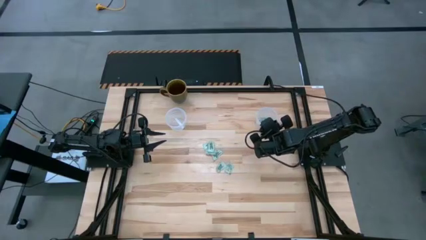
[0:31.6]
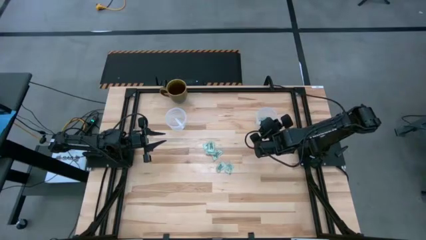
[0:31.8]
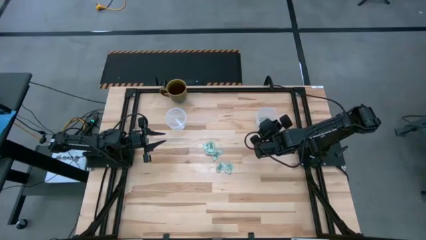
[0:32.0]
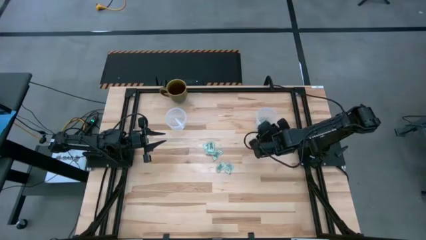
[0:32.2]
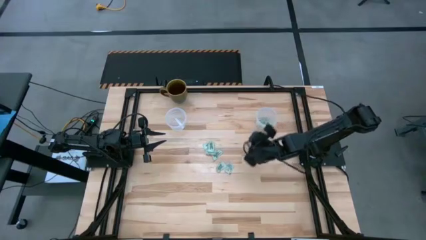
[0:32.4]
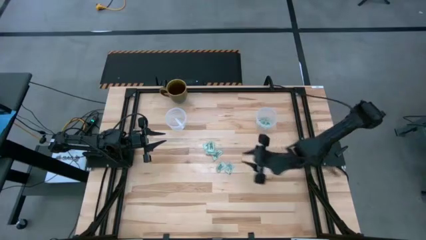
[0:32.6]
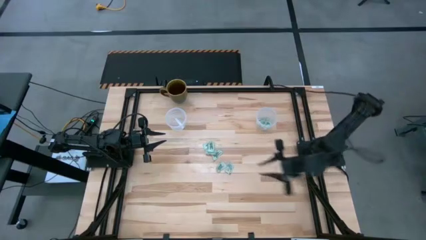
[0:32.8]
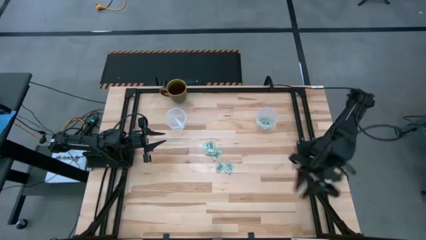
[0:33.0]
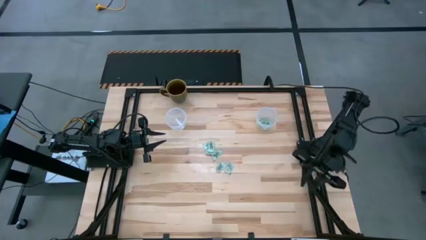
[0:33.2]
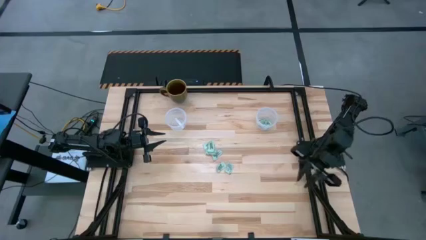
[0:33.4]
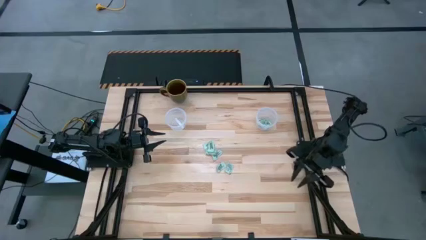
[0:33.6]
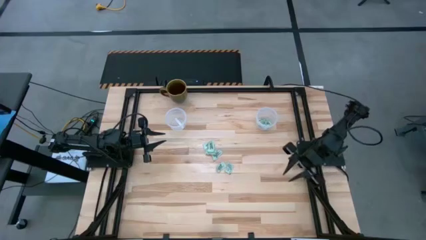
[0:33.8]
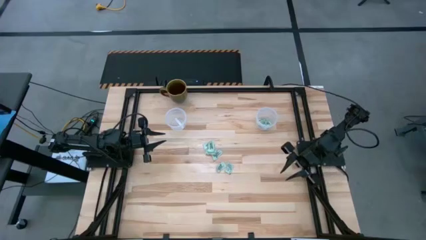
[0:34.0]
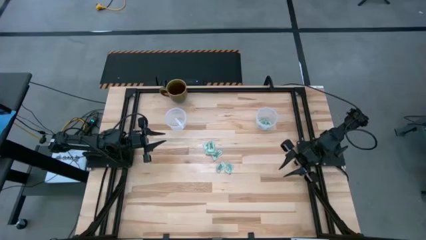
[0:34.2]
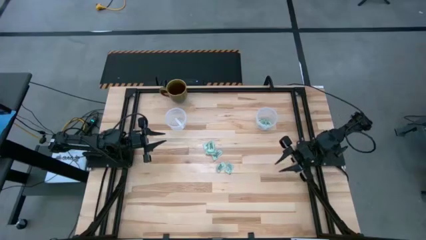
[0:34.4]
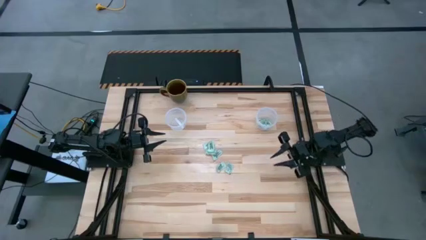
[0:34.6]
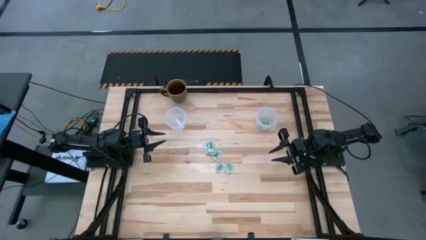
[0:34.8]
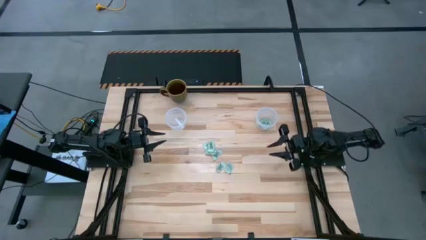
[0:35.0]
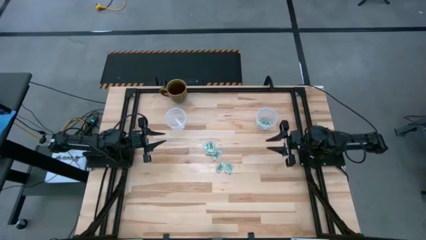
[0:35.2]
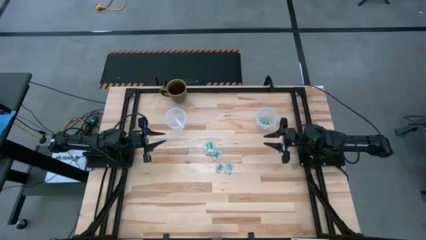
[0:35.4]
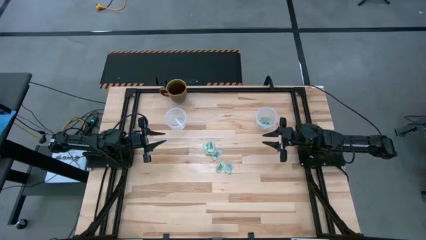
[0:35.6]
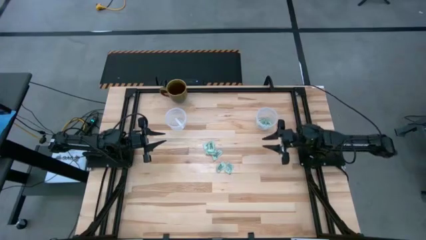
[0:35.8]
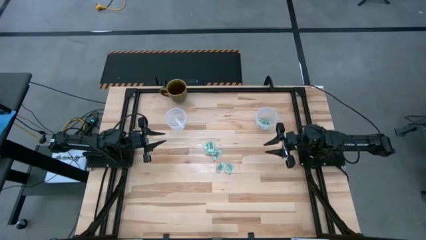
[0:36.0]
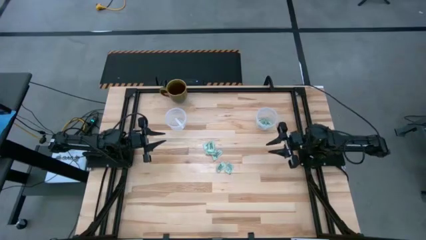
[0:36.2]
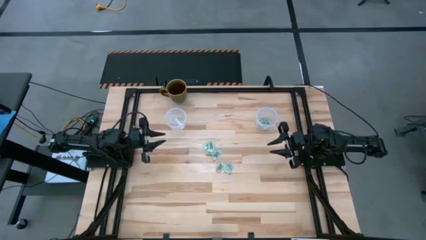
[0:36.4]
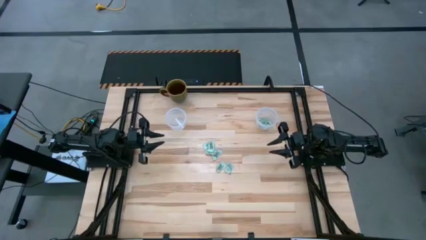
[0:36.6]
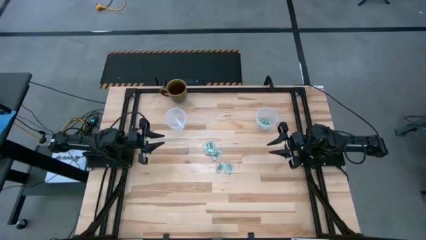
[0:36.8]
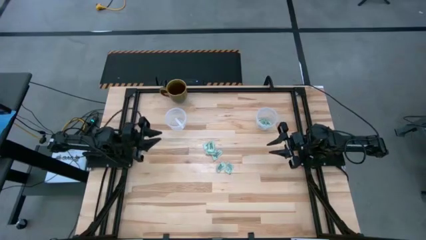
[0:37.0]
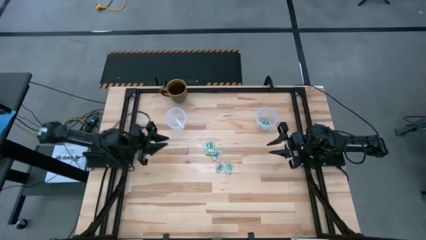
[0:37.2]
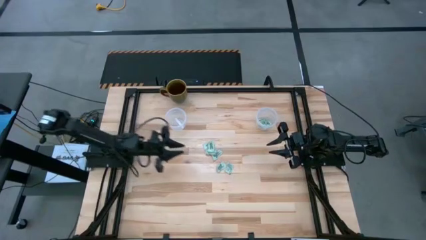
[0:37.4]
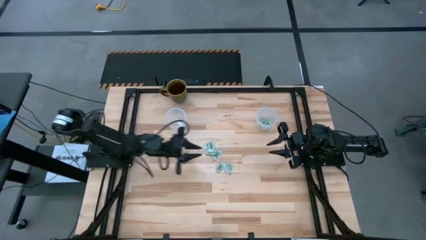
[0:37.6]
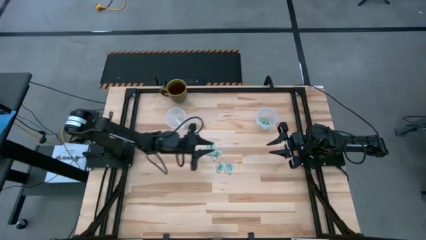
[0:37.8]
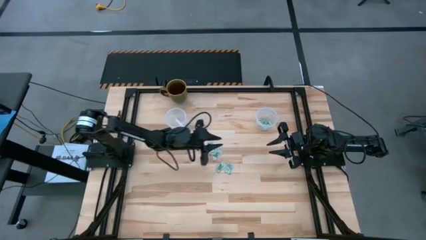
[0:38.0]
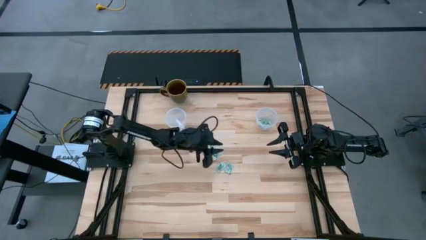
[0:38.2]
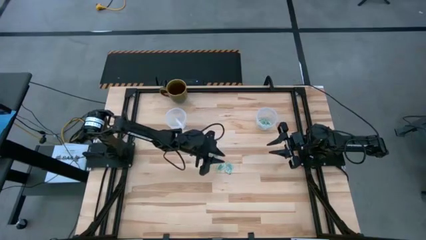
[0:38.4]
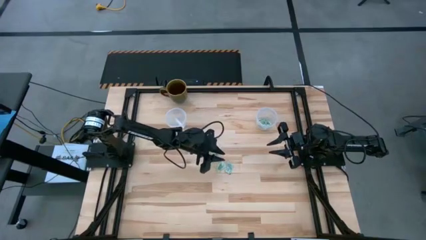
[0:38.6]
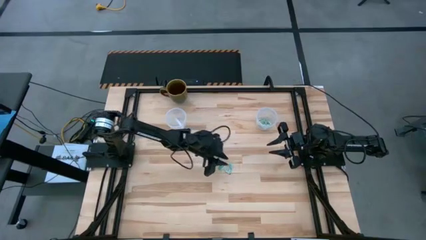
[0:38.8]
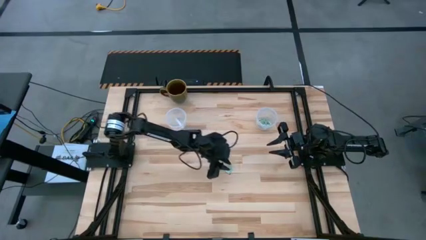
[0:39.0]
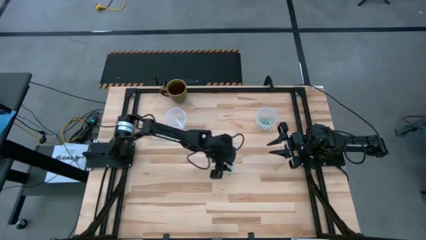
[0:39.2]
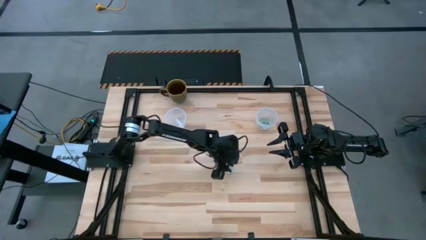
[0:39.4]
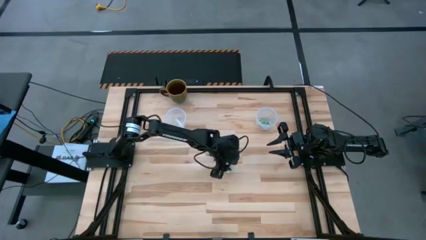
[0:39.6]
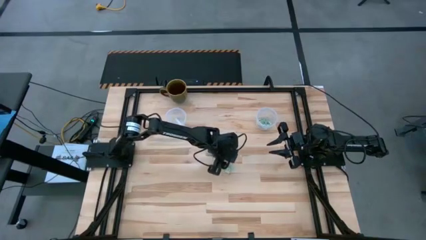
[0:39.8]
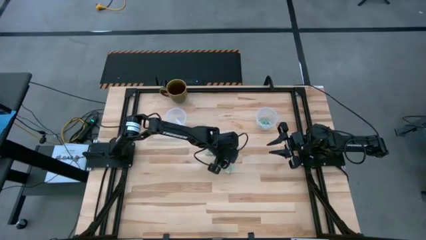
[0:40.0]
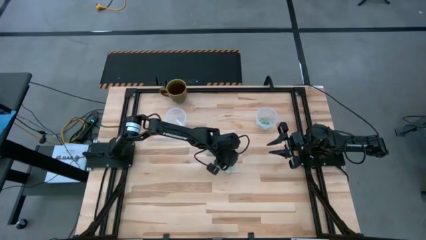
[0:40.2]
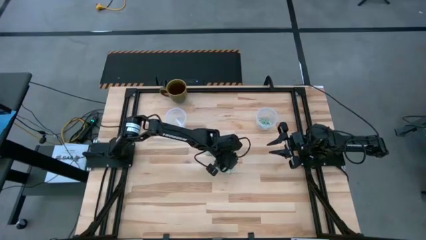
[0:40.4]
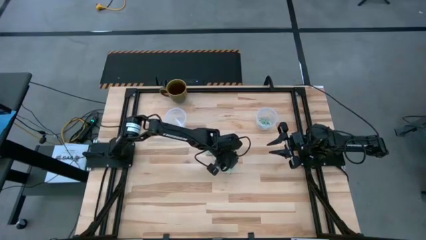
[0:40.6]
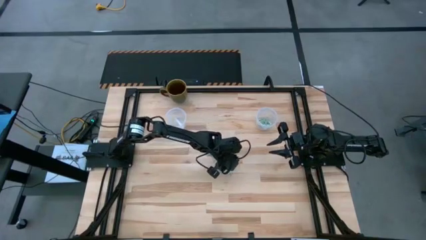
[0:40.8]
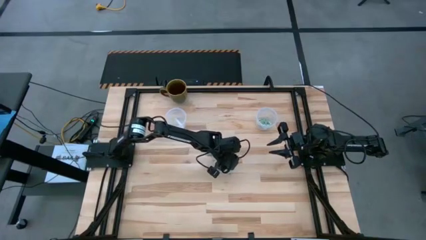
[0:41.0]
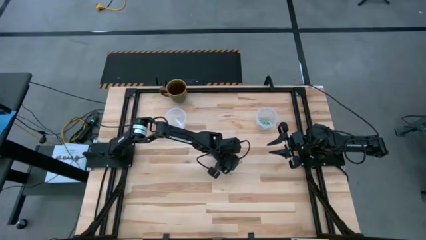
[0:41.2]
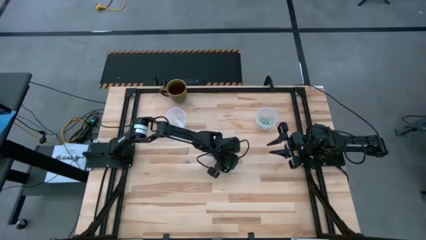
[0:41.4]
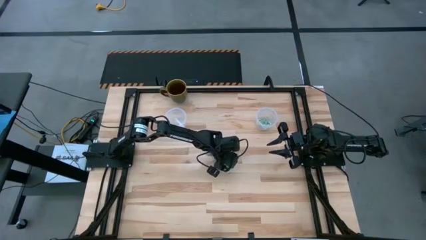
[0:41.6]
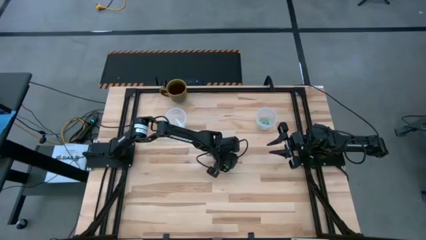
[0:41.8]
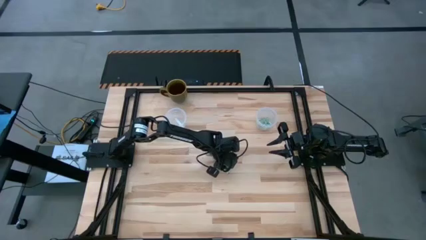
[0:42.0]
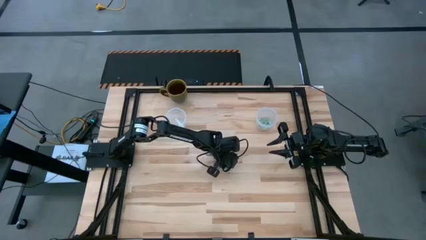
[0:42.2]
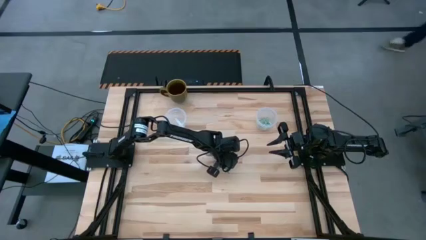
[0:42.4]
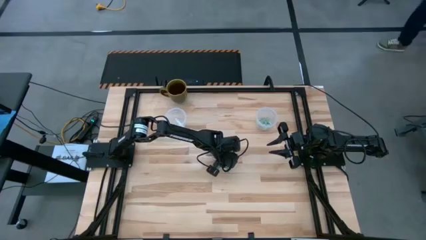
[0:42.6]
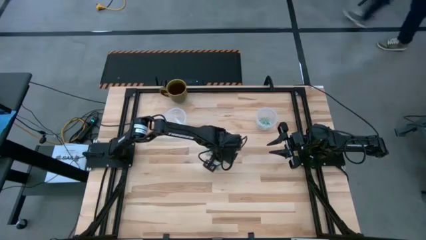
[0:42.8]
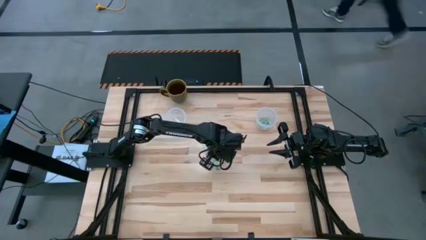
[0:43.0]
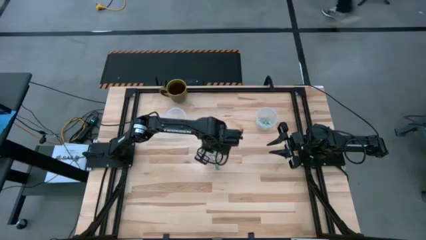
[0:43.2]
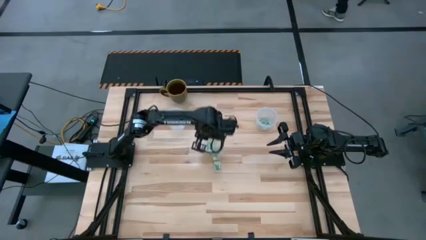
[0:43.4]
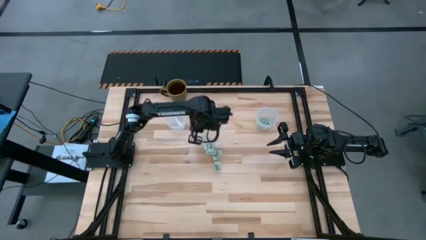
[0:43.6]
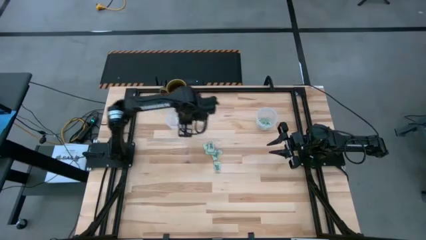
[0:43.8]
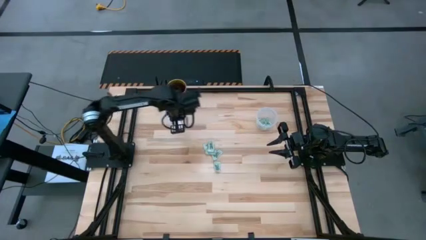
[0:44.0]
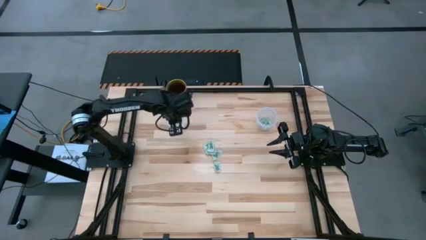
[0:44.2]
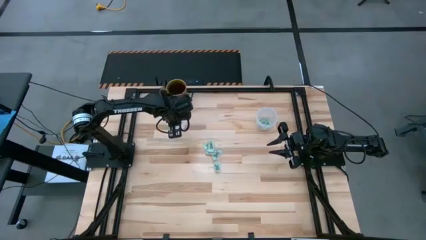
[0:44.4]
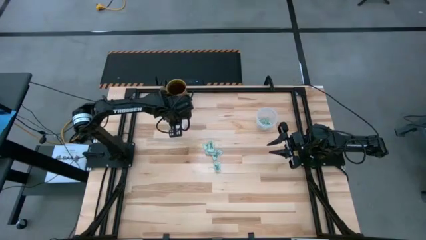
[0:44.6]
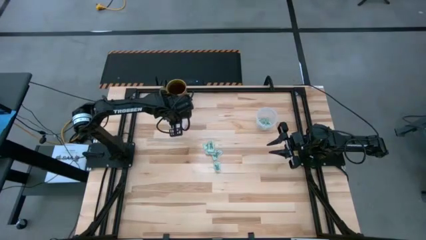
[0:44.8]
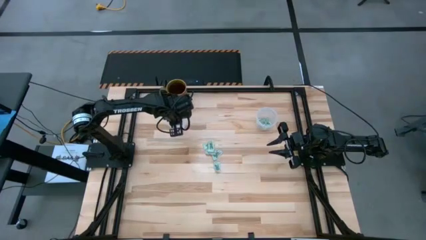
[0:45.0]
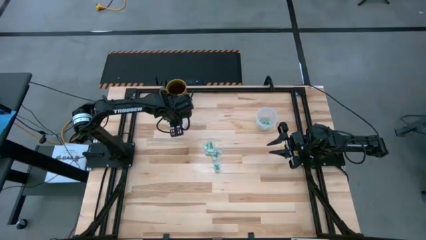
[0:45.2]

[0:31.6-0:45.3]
Task: Pick and place items into bin
Put the stevia packet into the left transparent bin

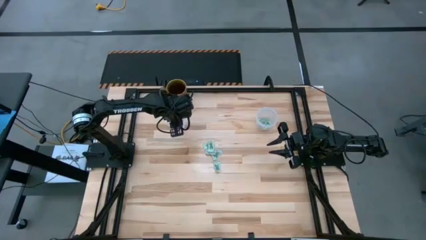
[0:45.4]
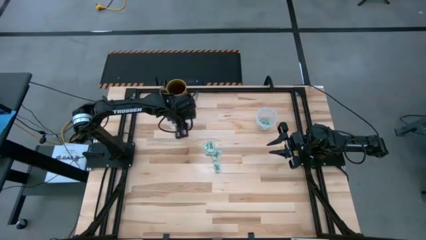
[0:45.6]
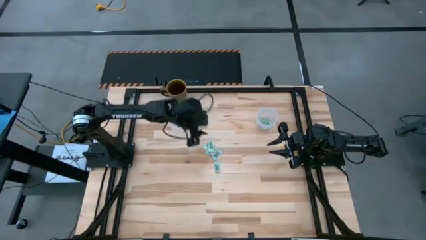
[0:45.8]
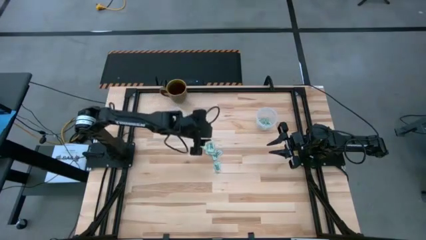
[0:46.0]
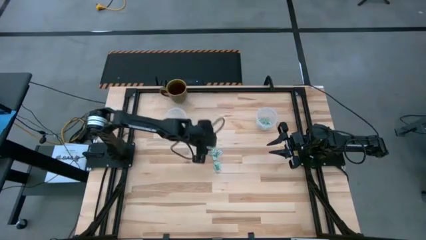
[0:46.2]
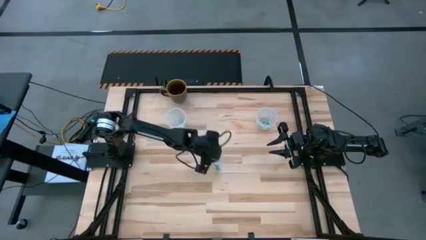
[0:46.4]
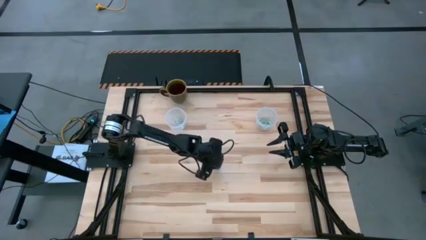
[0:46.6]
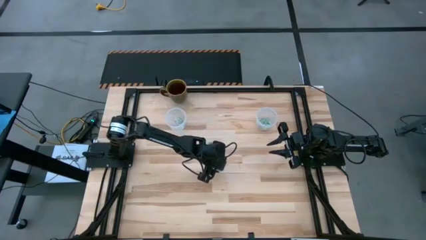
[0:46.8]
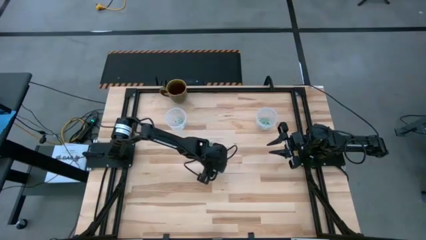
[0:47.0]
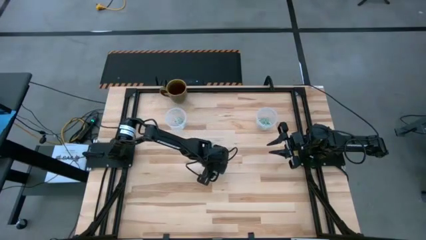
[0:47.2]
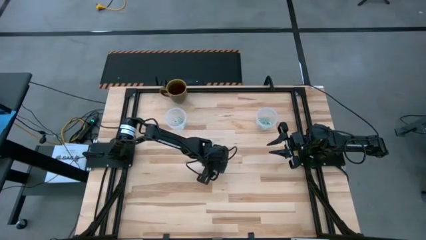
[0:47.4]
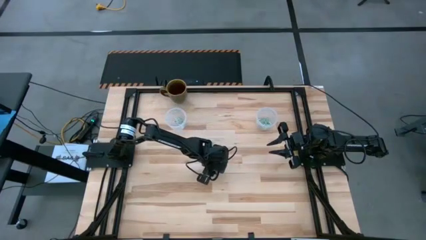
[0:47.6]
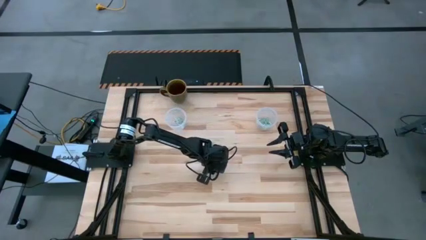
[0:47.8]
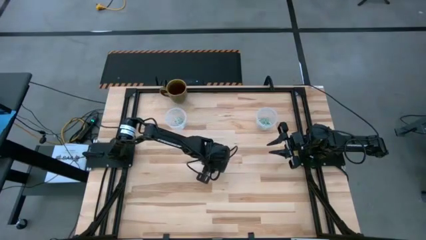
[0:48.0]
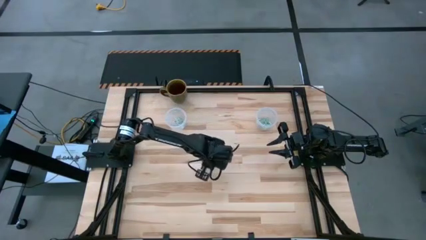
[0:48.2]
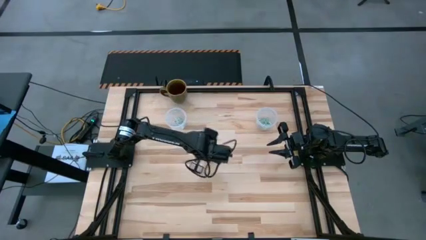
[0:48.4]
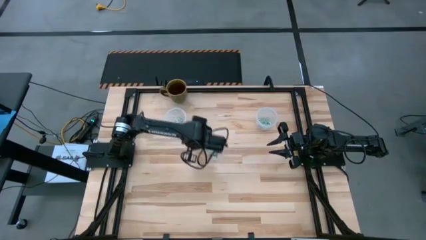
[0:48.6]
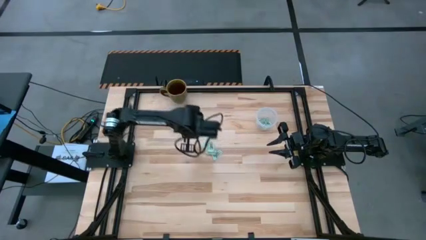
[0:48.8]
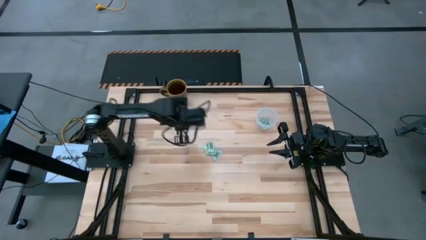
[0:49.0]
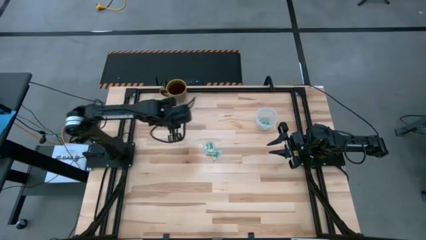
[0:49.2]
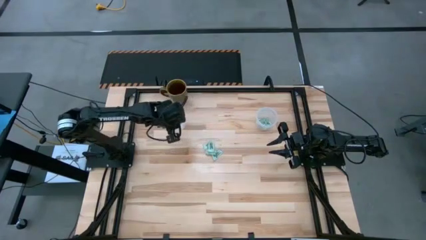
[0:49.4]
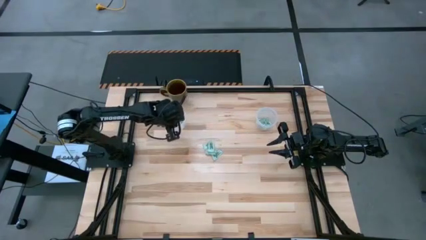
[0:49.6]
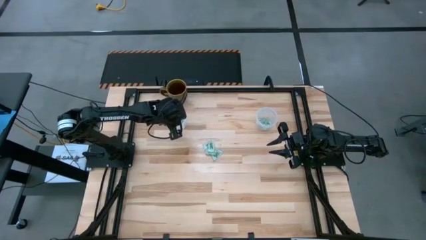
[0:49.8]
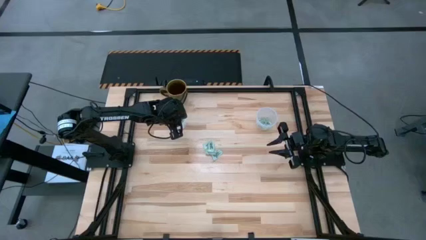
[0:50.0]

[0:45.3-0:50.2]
Put the stevia packet into the left transparent bin
